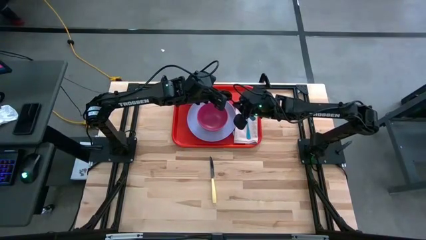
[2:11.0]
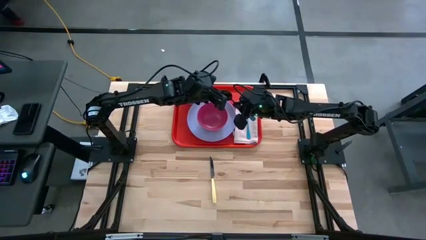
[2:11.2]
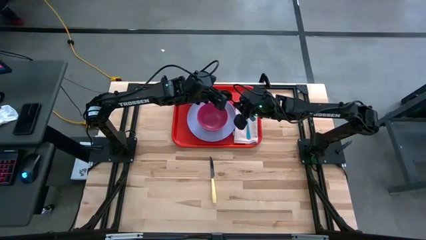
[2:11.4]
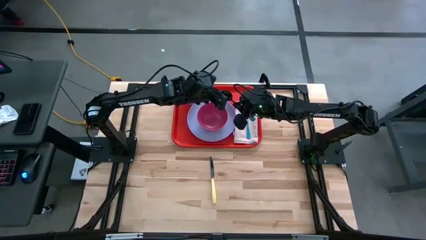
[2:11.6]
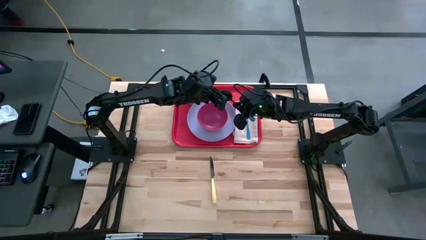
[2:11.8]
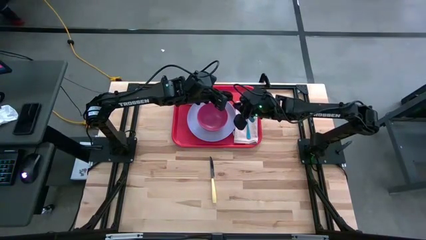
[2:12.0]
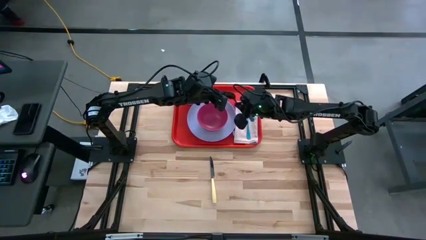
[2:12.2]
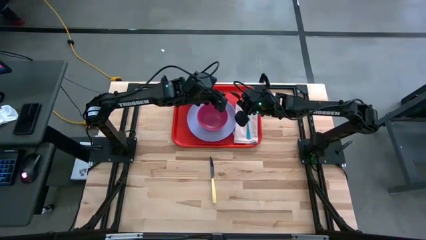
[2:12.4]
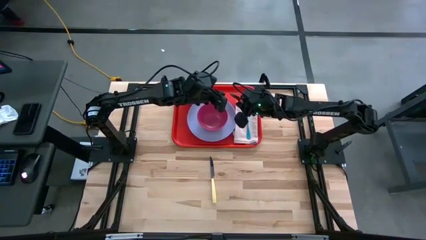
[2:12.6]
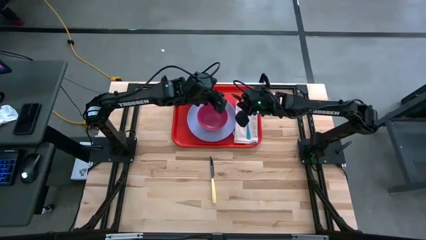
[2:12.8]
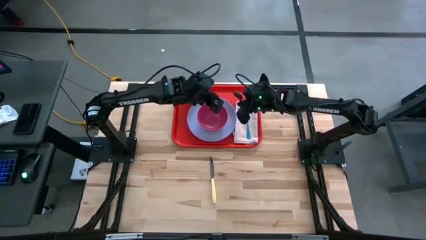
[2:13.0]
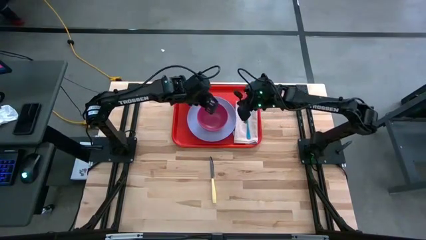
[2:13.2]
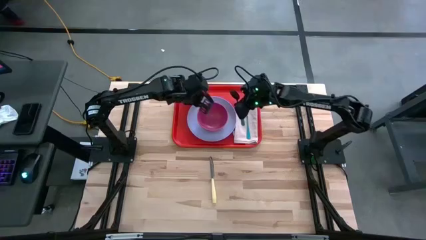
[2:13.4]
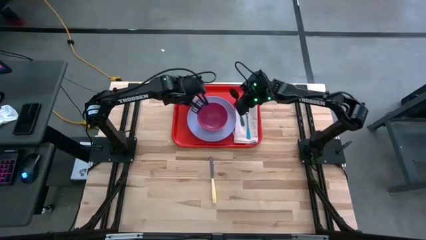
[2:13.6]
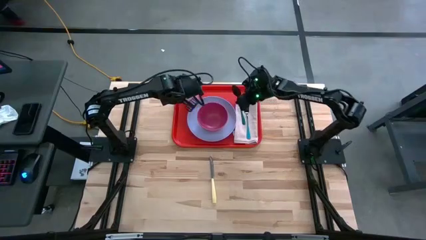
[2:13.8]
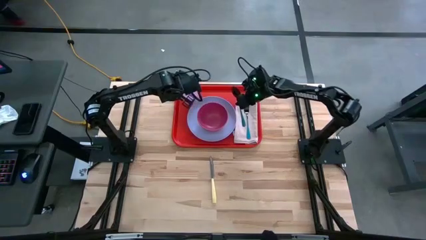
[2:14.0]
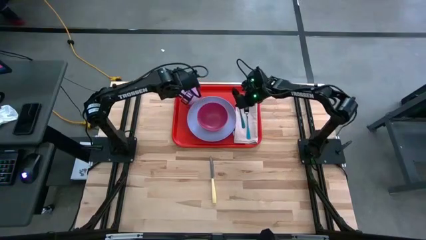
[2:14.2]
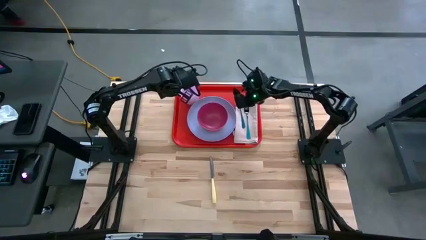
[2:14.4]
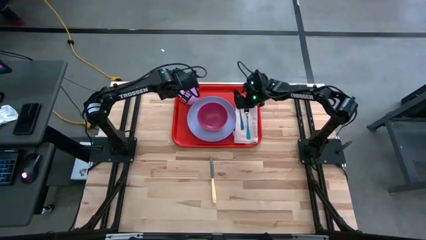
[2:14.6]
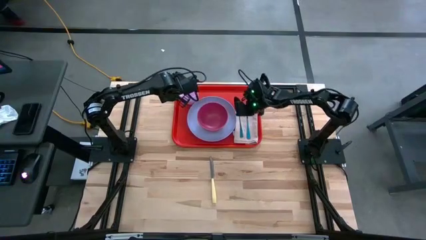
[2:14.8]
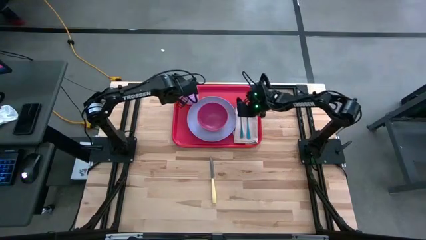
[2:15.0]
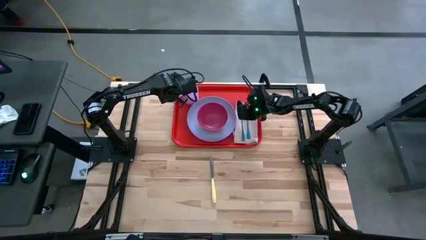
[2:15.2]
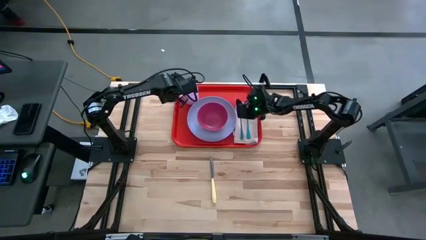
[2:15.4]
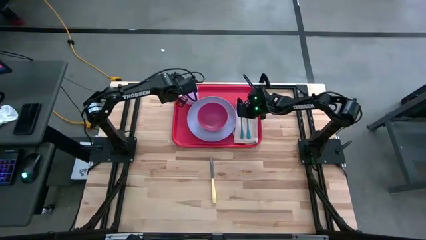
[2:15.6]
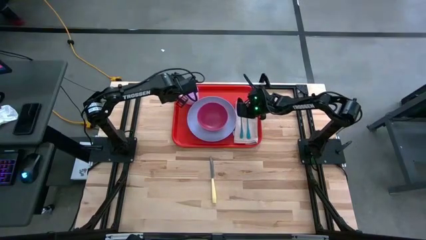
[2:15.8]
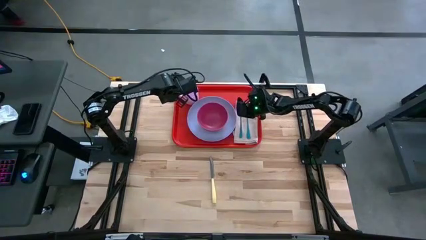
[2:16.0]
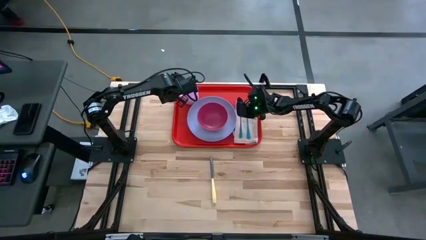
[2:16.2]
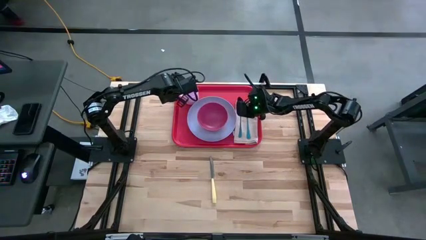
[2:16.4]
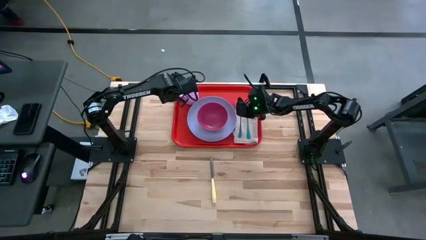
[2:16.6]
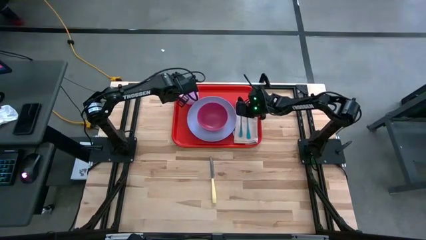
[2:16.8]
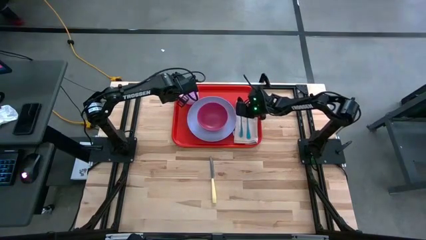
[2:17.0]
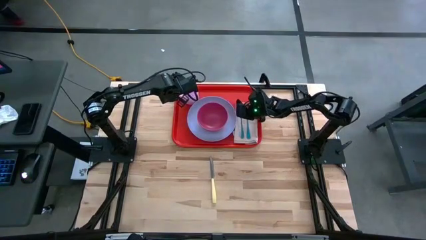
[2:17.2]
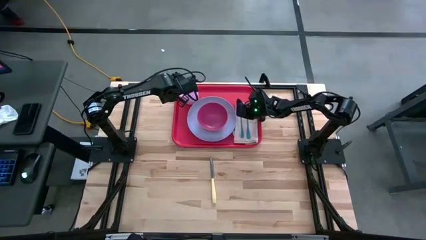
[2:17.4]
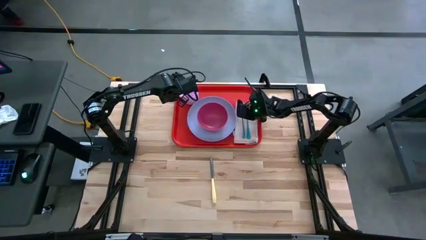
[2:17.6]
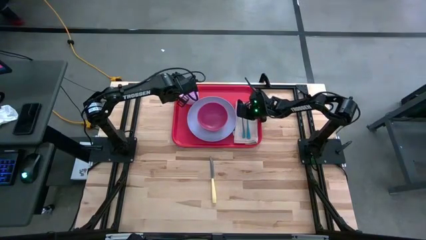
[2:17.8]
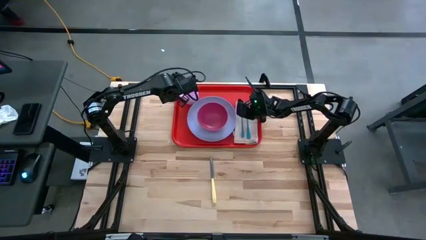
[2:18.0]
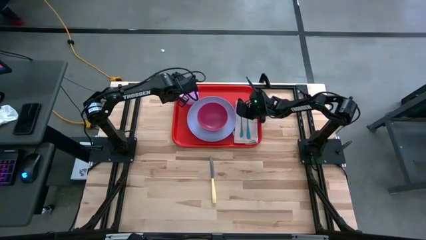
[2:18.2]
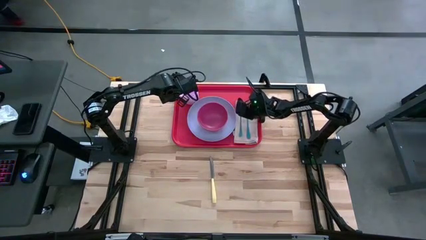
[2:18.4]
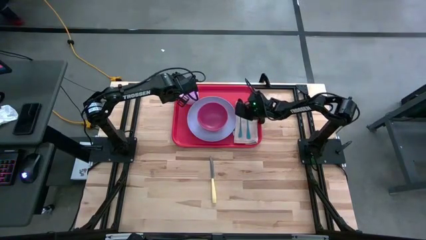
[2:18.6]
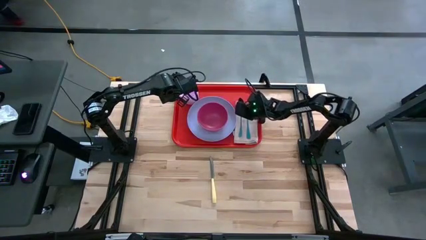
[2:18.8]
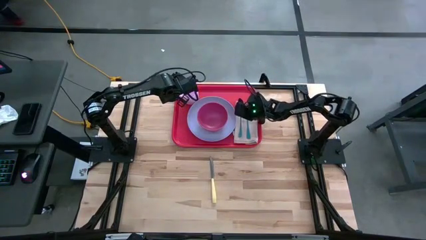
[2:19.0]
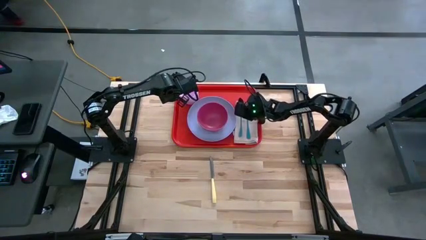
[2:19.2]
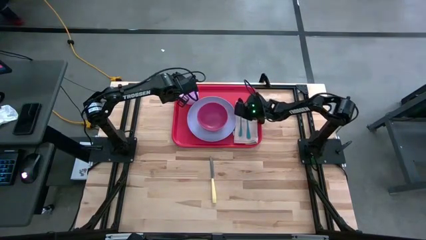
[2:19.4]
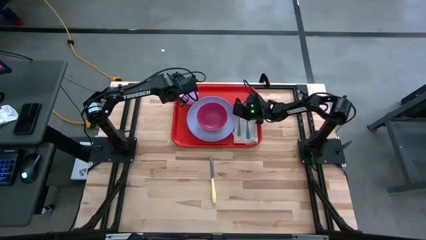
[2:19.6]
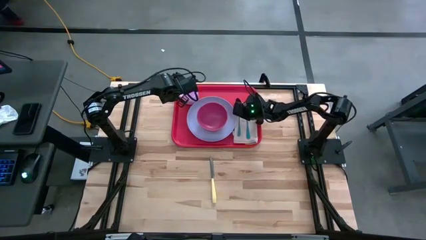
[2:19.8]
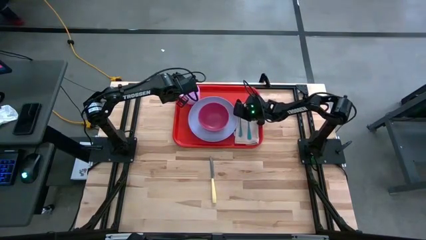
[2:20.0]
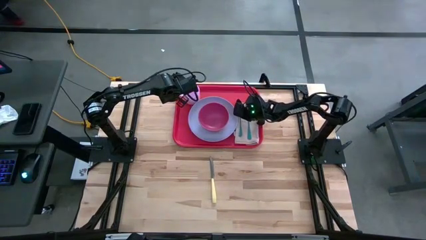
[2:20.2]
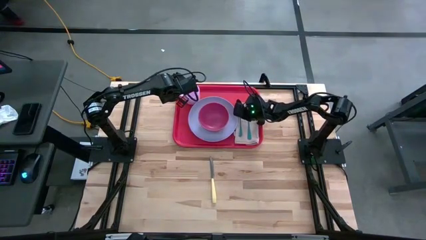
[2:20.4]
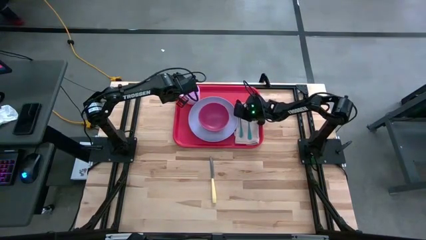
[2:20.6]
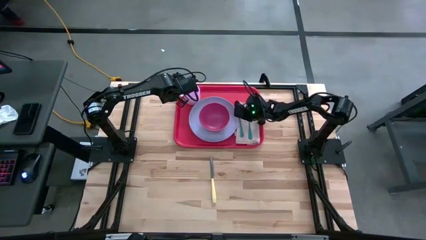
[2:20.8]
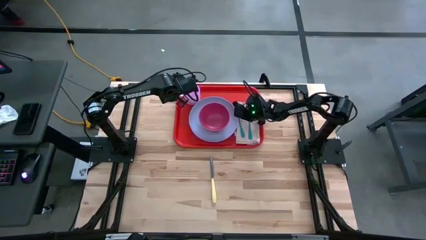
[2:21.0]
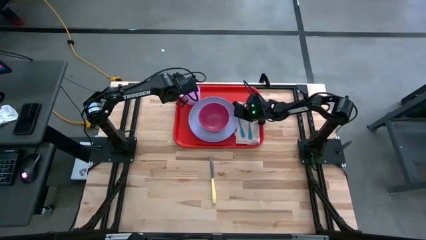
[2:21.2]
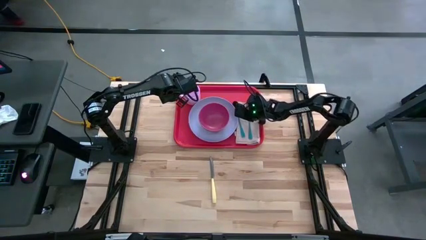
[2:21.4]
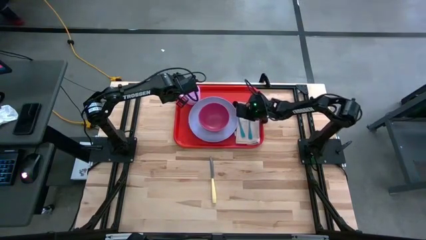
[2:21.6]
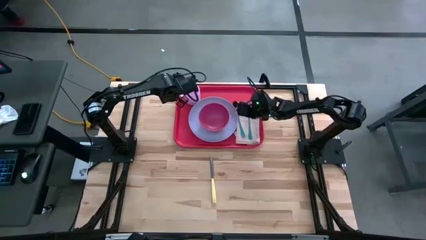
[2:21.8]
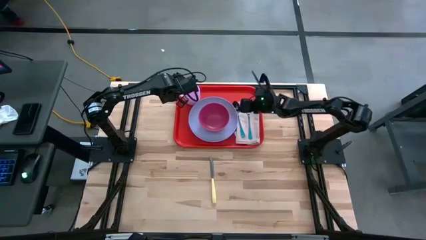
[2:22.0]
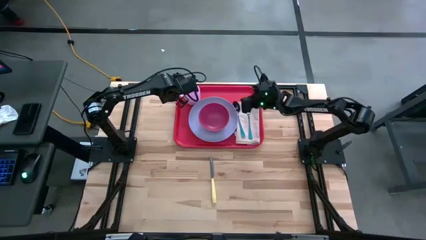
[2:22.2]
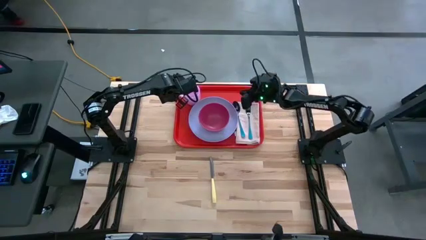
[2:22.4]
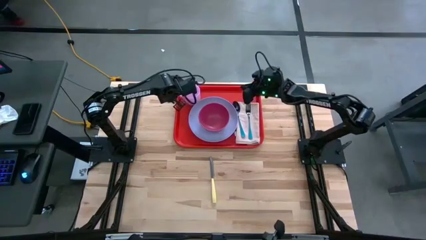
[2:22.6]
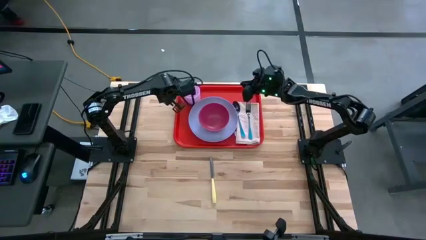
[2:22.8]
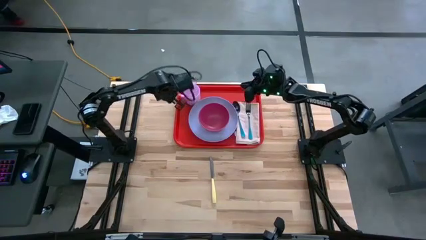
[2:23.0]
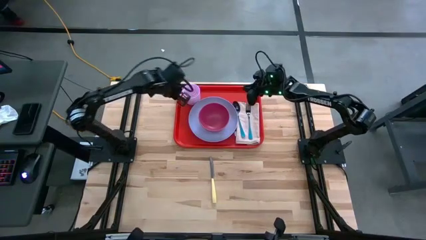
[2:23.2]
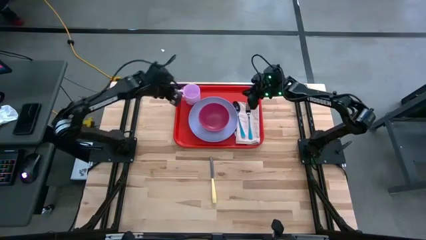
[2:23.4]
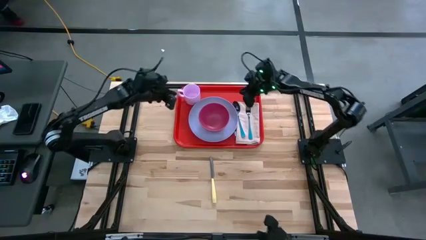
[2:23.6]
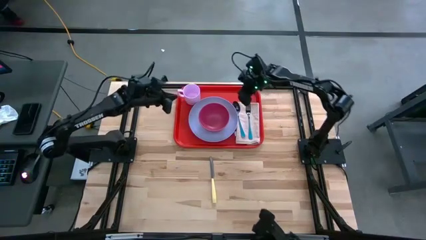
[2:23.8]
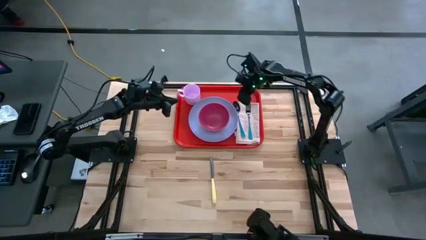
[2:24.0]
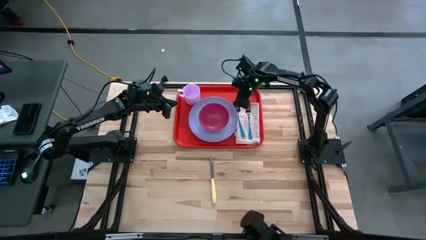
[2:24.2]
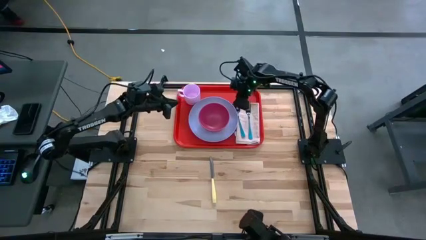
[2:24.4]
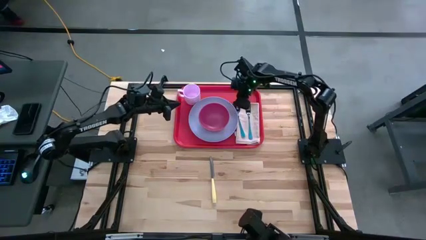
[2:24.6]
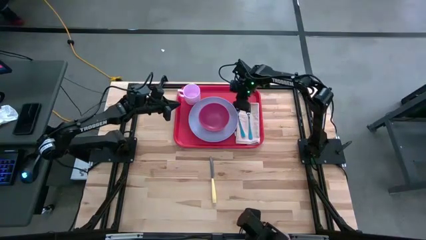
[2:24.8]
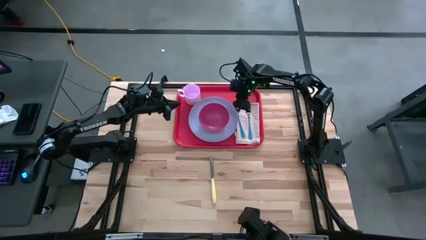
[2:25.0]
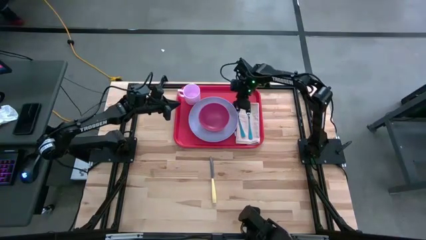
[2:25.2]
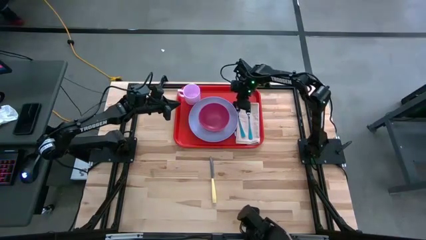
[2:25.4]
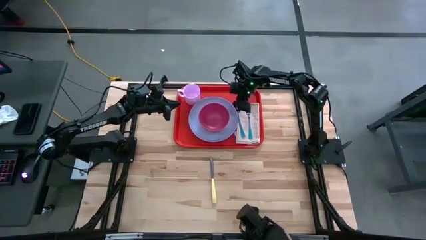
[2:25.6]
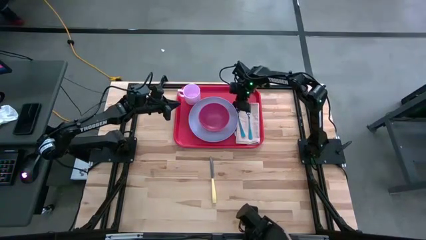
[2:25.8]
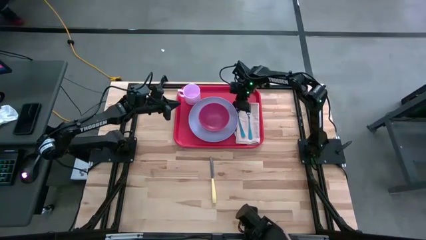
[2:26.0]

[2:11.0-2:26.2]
Task: Set up tray
Put the blue spoon on the white napkin to the left of the blue fork
